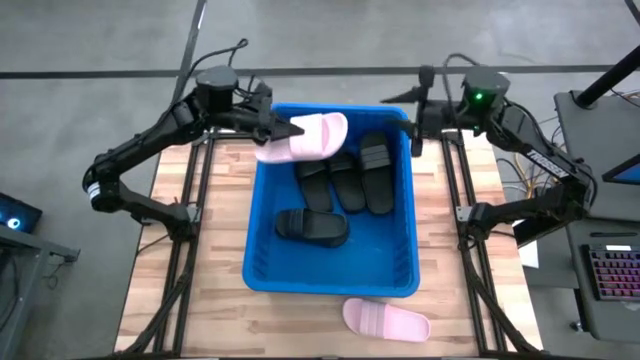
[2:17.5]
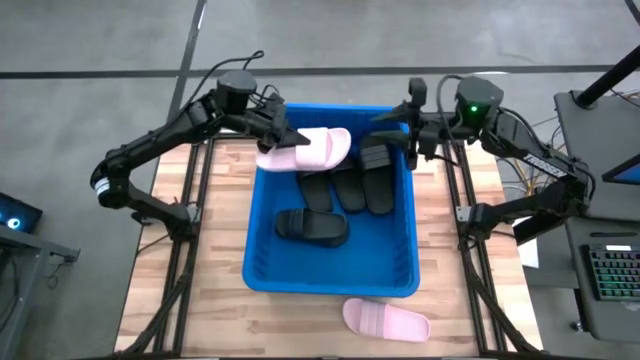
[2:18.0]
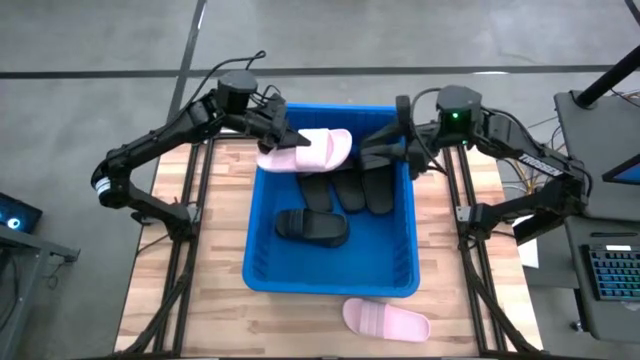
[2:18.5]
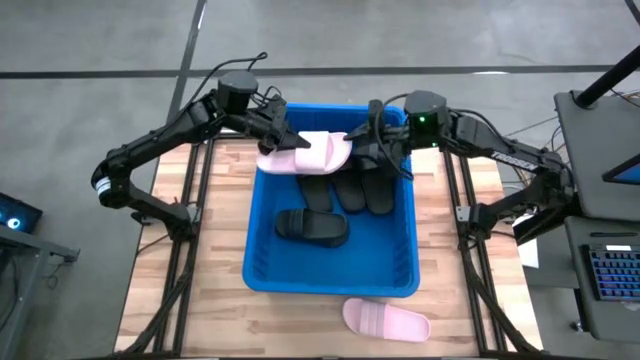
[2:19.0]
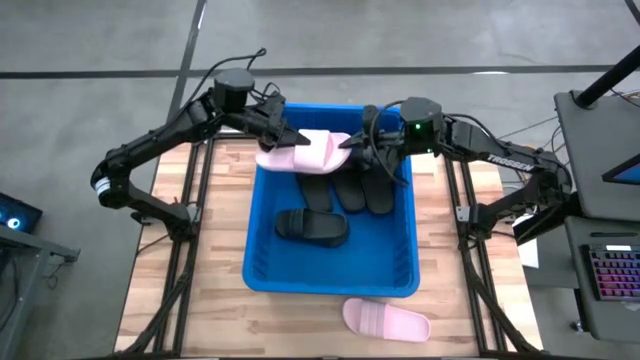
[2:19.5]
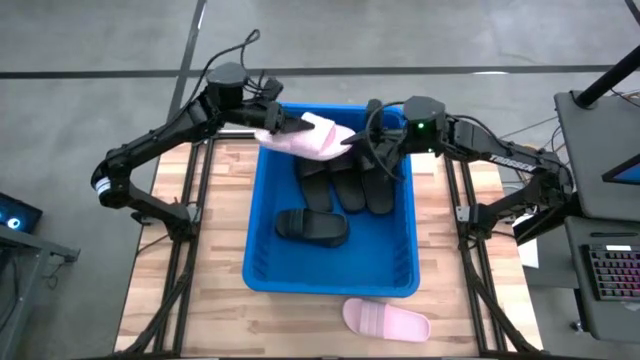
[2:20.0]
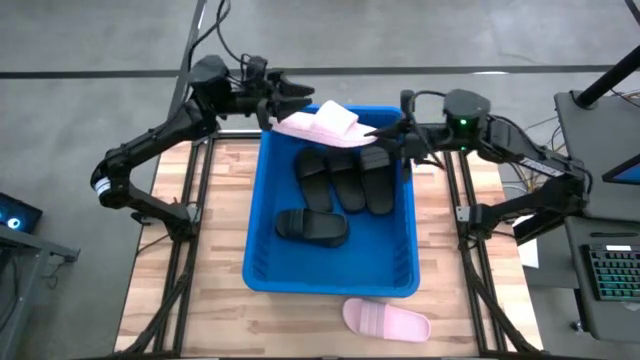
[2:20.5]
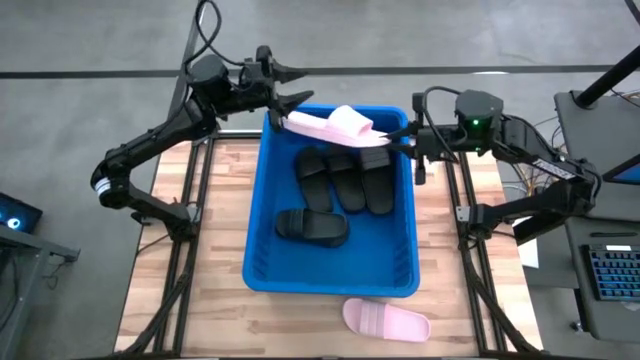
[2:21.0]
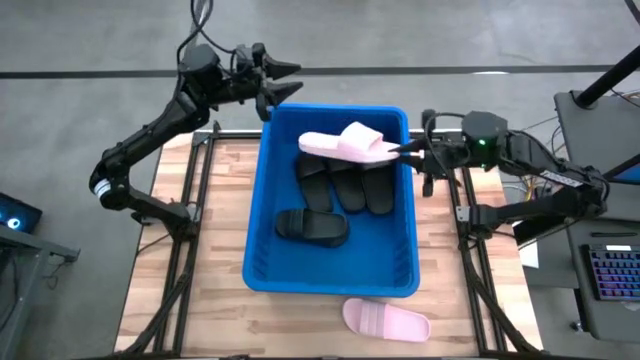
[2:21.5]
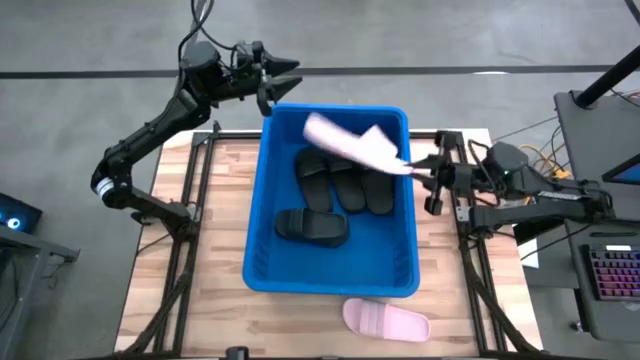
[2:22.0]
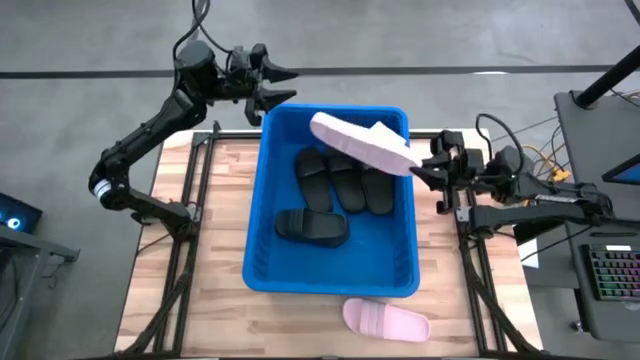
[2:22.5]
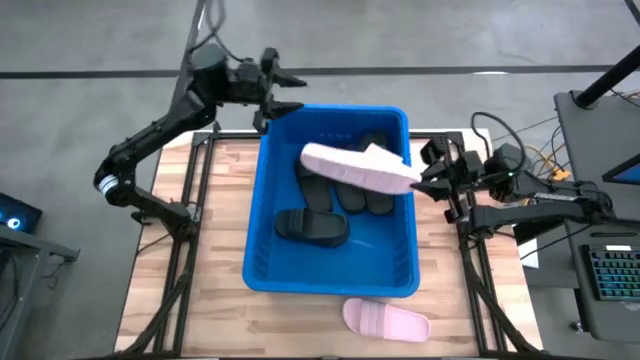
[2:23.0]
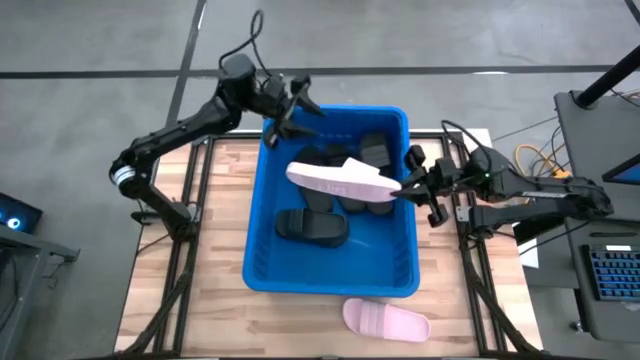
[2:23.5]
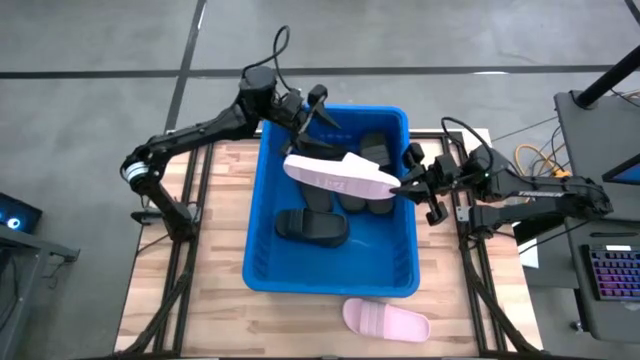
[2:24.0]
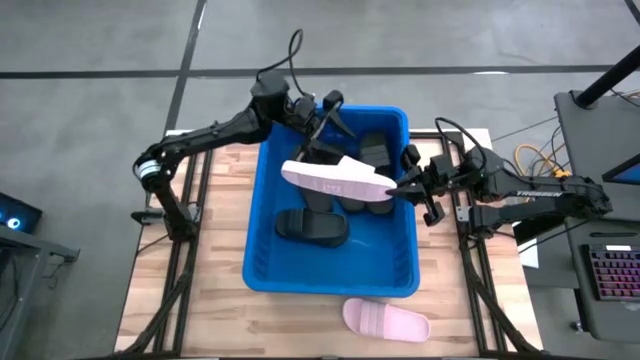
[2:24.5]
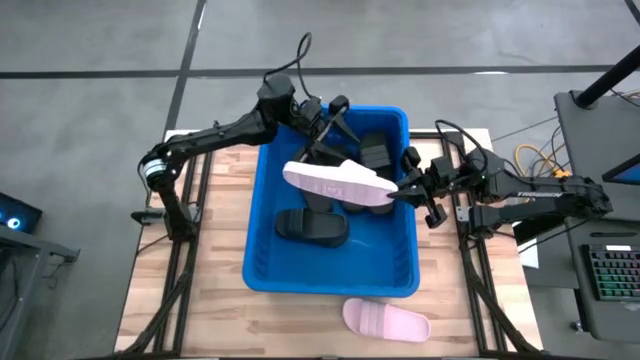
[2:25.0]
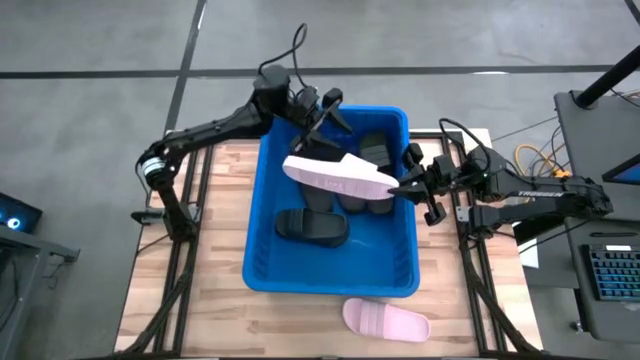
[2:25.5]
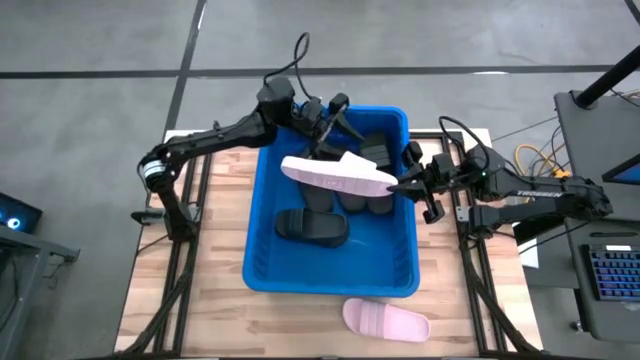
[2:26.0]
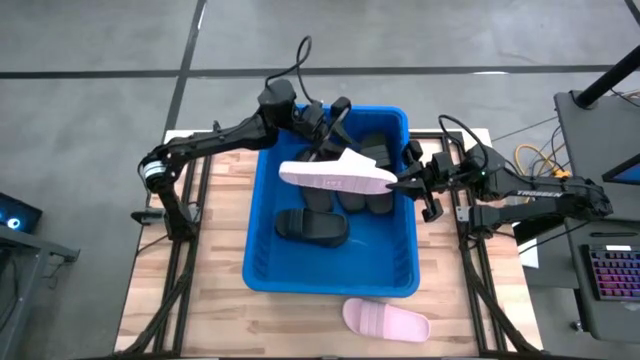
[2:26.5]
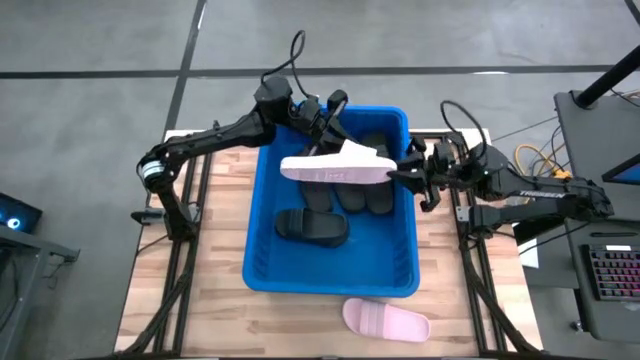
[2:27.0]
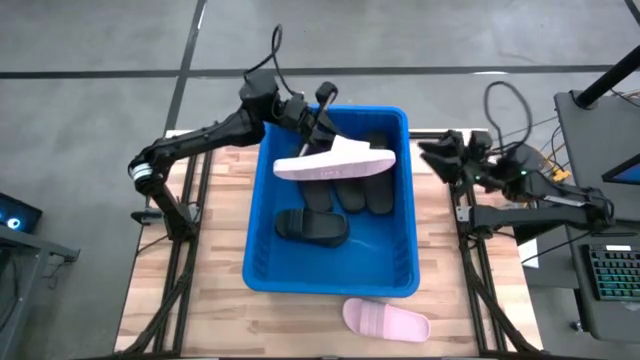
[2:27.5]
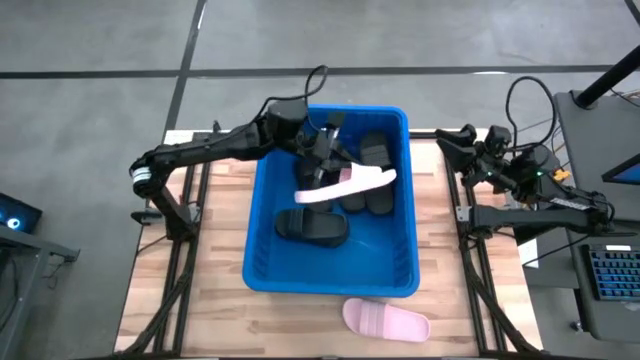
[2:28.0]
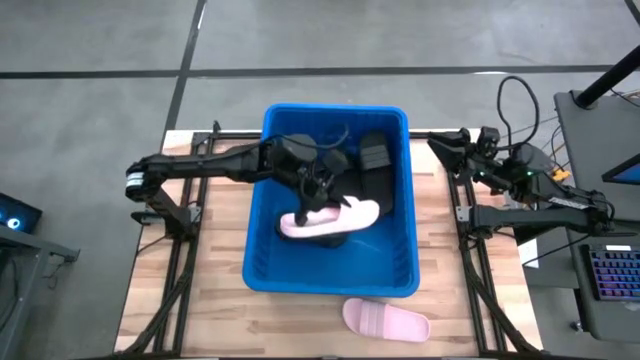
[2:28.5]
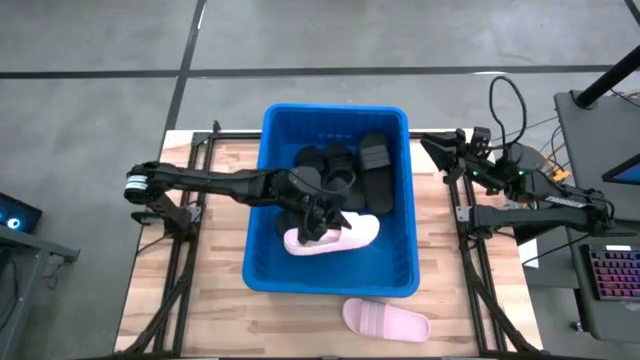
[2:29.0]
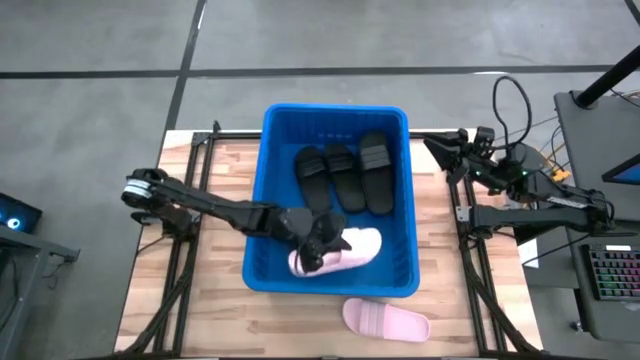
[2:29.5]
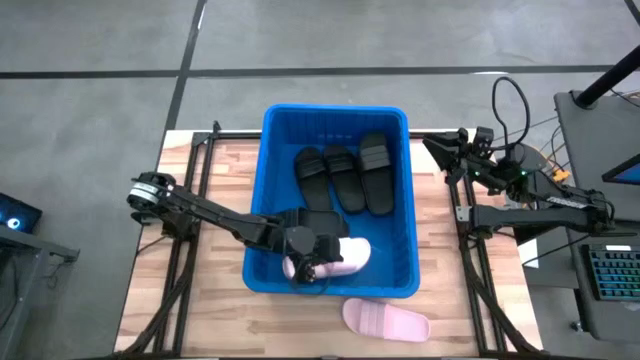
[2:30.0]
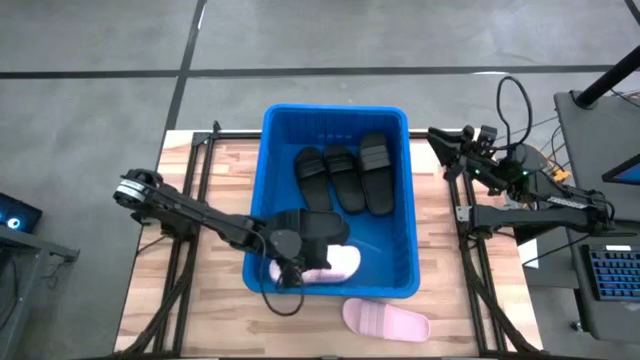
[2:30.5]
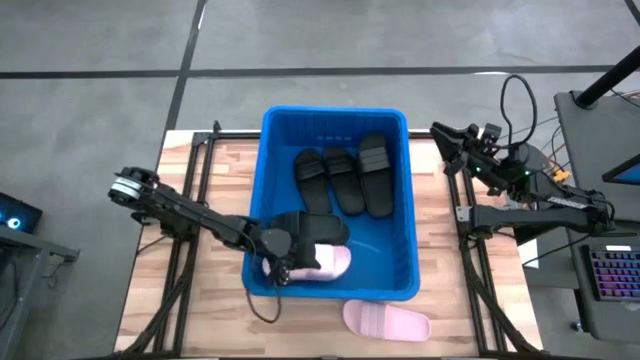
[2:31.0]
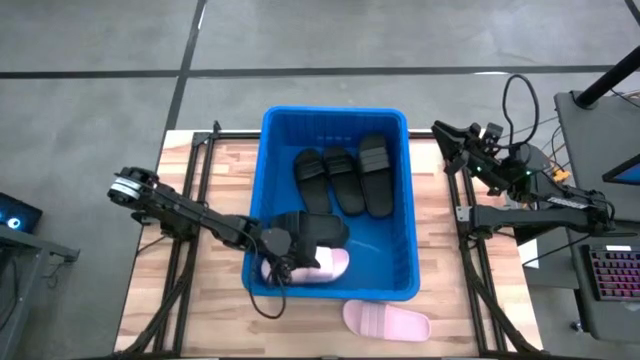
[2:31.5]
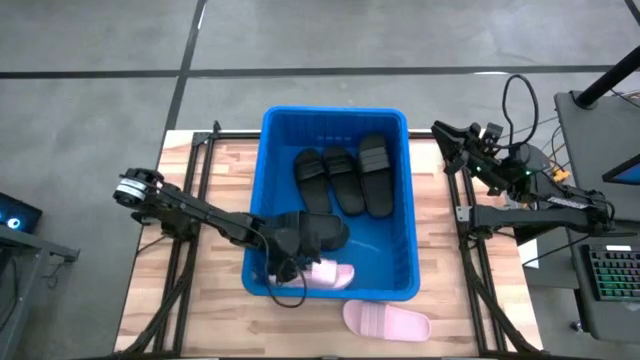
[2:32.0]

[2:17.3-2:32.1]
Task: Pick and place slides into bin
Put the pink slides into the blue organize bin
